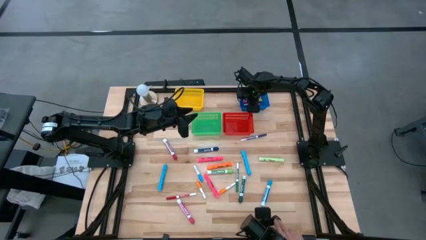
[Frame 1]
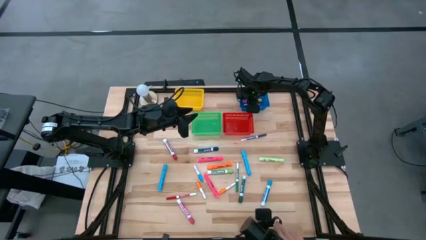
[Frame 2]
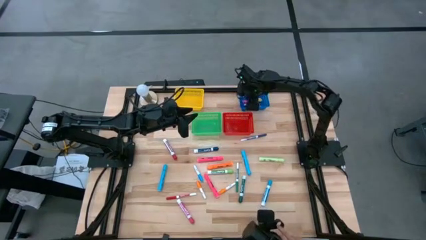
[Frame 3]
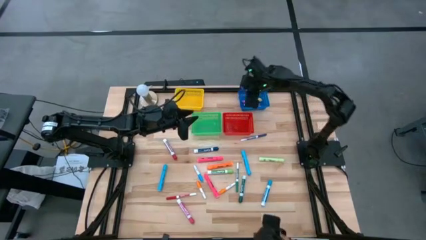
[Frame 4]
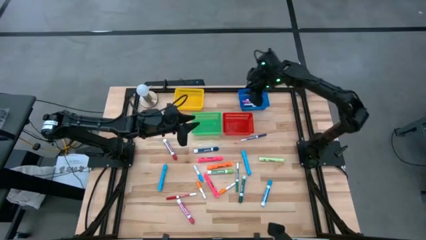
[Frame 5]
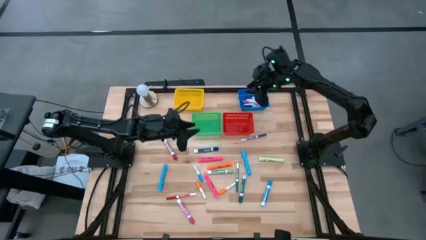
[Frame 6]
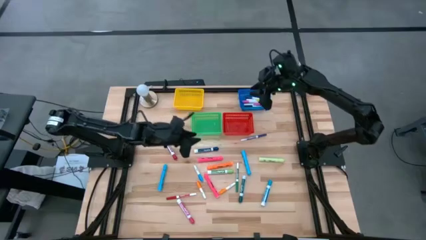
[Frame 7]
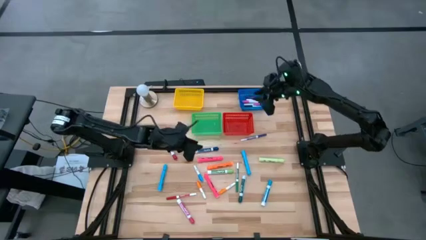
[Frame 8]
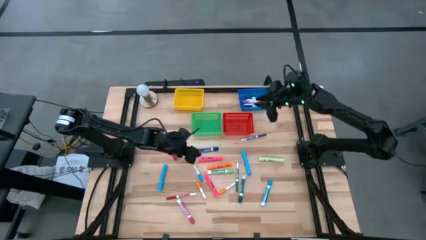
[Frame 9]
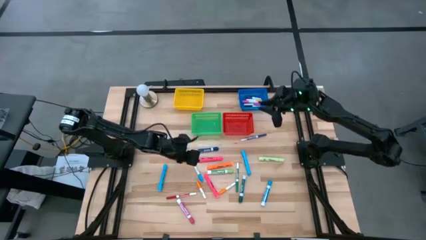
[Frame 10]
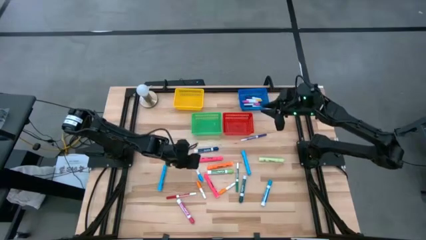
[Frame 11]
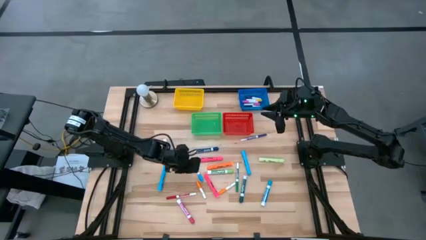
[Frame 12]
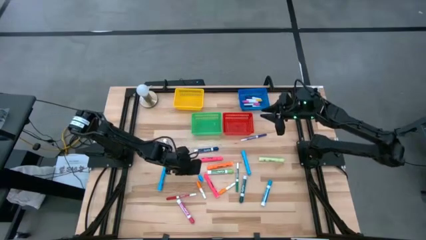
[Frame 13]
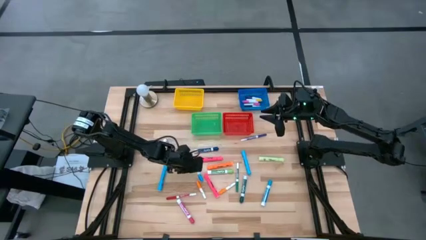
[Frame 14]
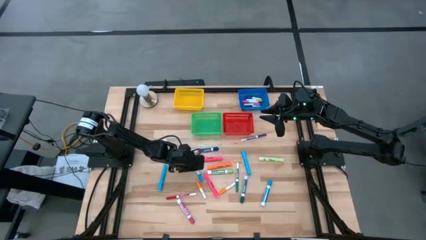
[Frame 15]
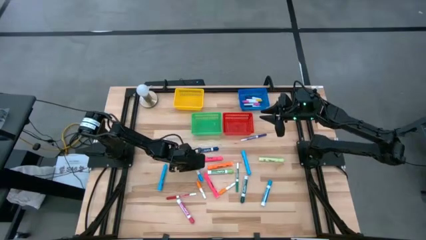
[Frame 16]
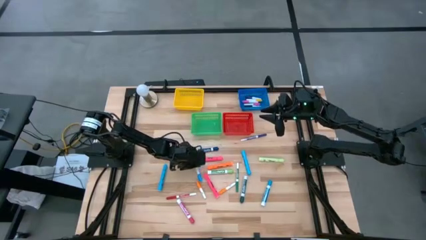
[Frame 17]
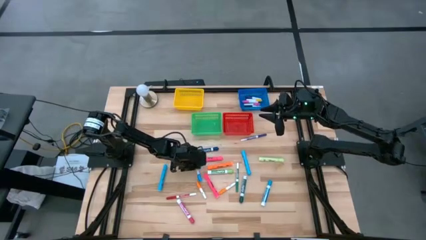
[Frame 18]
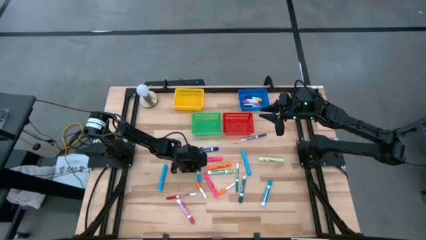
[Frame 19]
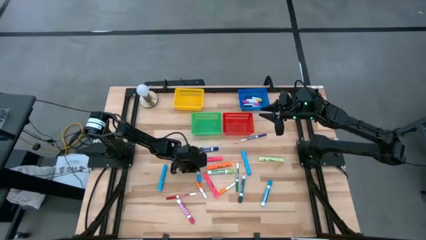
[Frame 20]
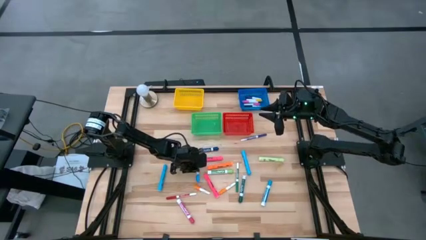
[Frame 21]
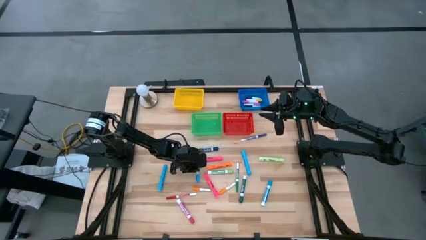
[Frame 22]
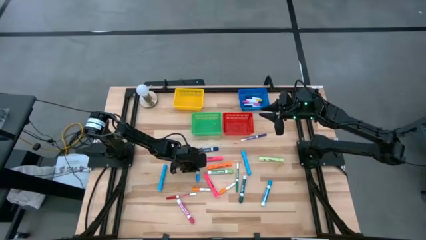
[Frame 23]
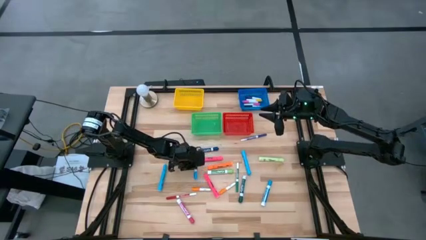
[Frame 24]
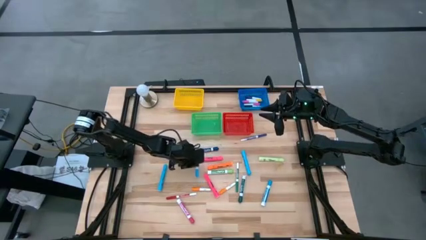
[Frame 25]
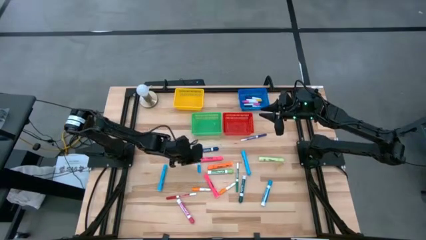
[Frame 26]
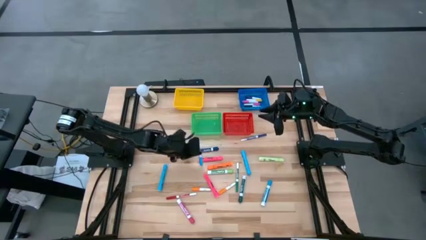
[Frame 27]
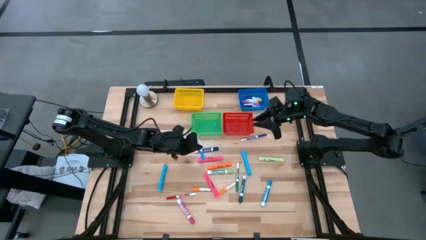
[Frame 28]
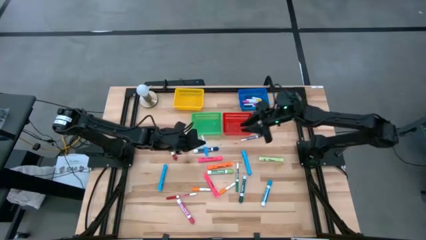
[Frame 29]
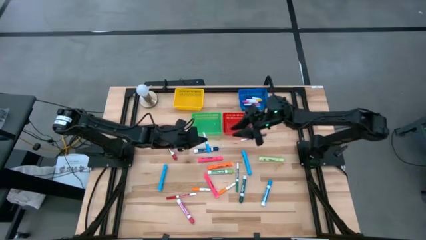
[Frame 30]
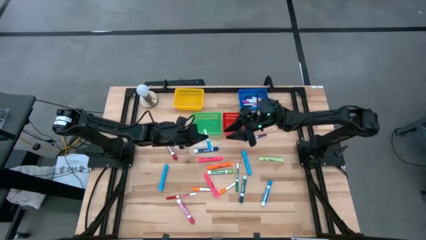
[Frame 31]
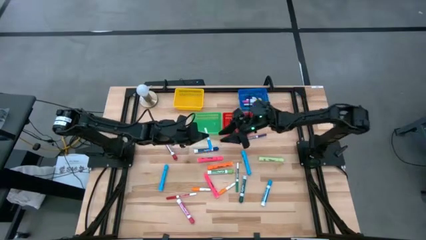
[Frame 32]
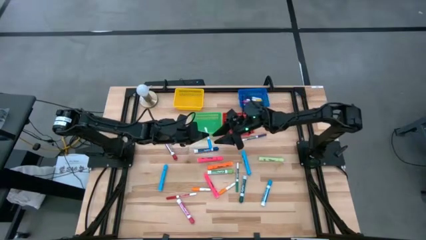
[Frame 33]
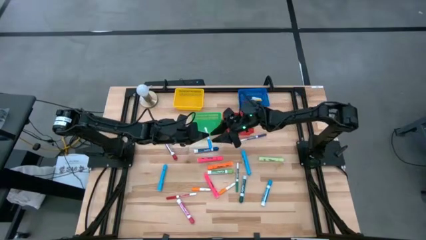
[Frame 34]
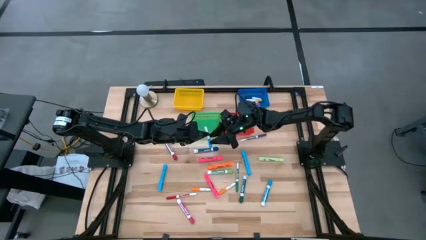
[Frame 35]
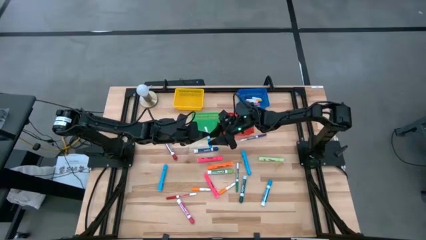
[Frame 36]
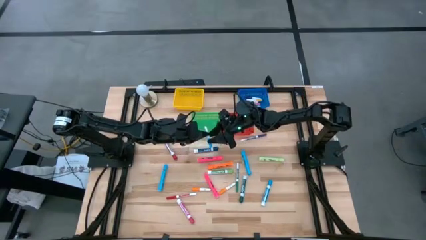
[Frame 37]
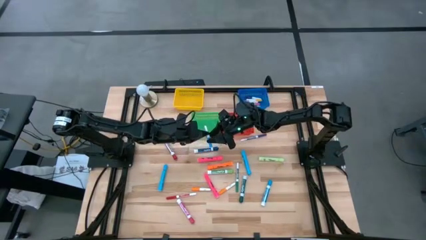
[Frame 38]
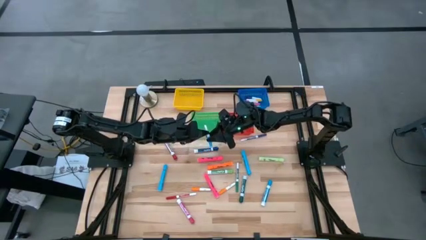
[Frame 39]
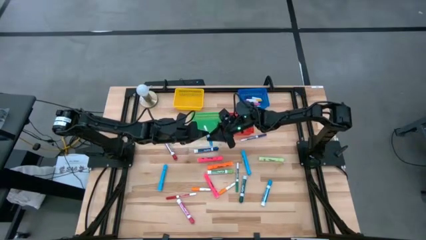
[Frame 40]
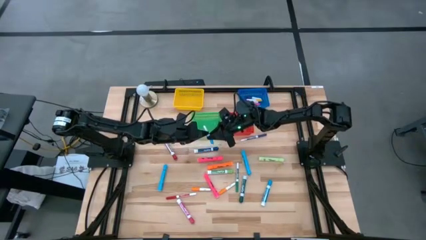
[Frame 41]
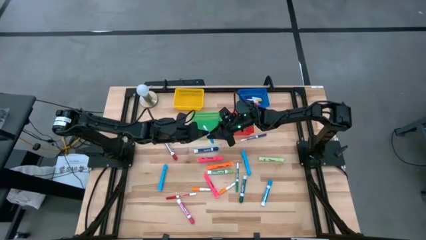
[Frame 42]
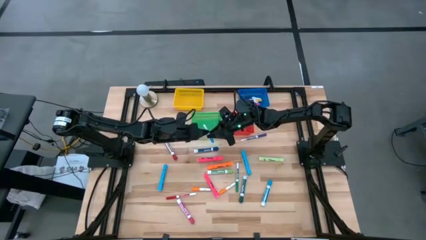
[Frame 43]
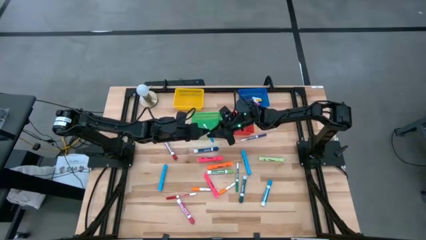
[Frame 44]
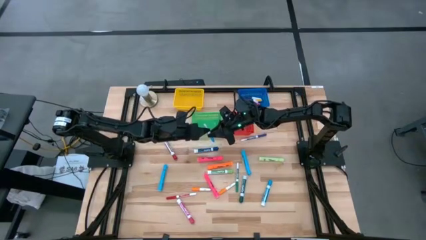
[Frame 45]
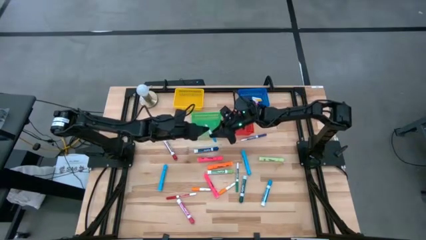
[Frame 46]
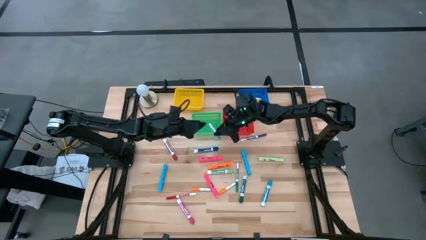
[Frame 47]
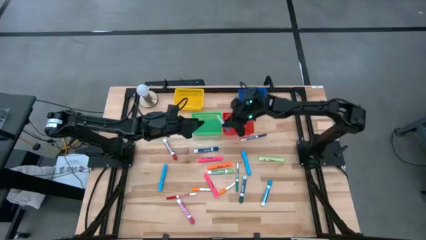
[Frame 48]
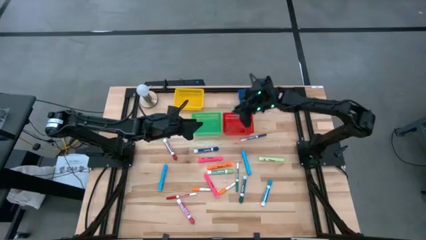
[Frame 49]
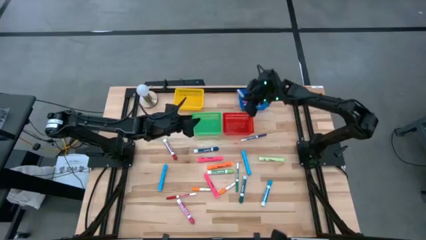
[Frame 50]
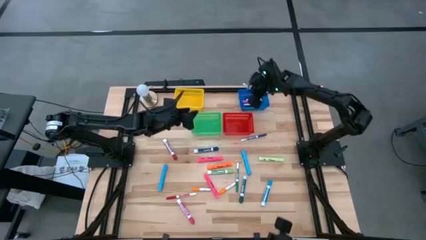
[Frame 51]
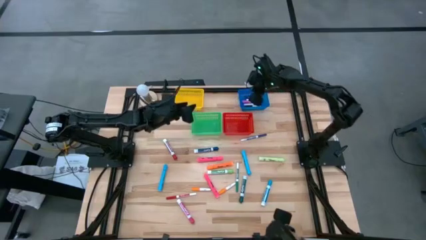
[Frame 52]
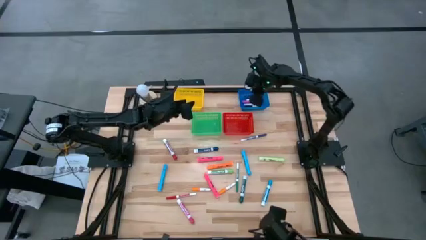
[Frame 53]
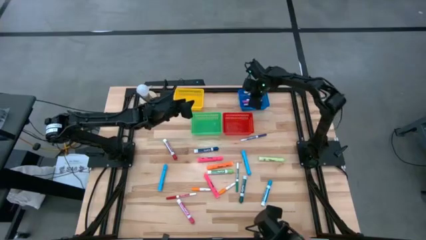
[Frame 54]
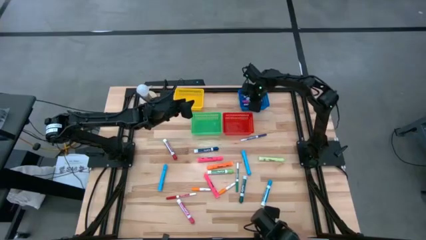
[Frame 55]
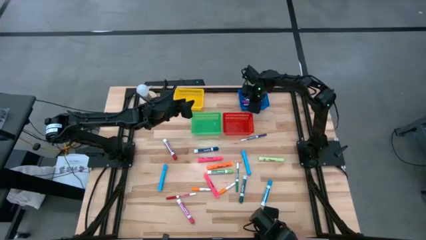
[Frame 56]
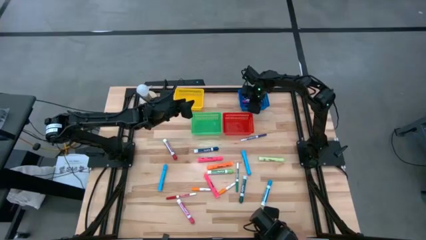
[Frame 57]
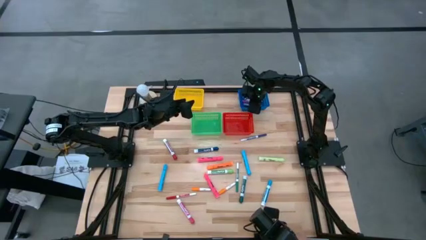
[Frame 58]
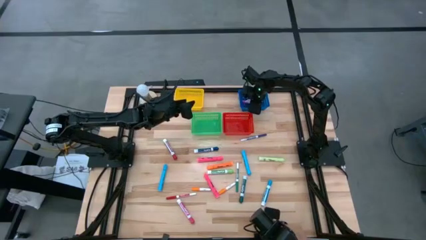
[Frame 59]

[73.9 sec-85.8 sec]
Task: Pick & Place Markers
Put the blue highlighter into the blue bin

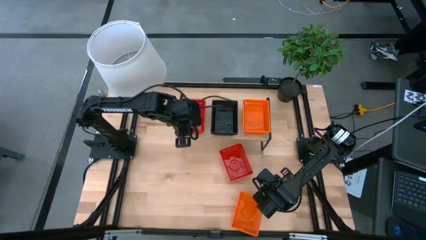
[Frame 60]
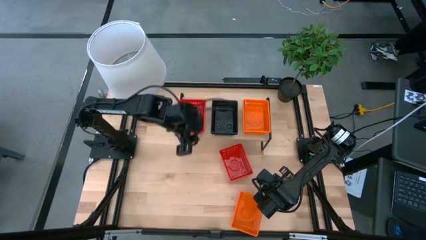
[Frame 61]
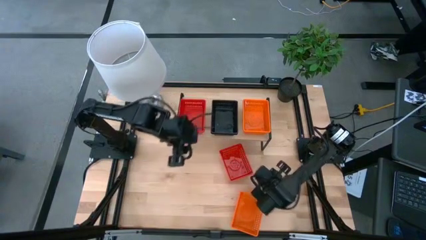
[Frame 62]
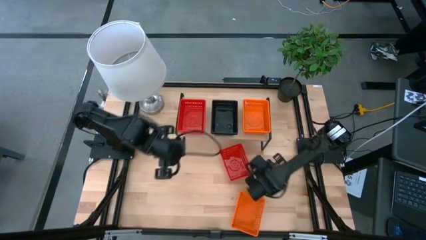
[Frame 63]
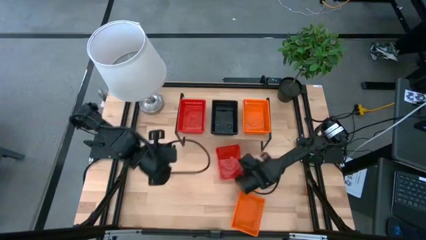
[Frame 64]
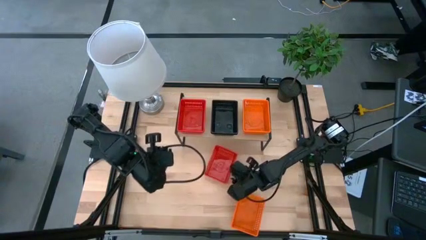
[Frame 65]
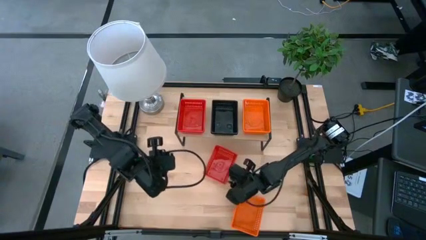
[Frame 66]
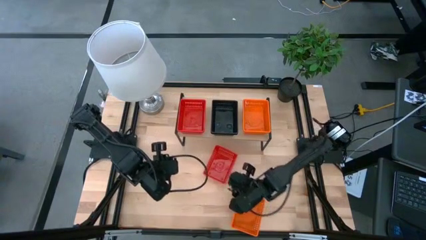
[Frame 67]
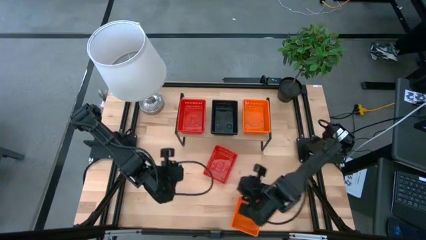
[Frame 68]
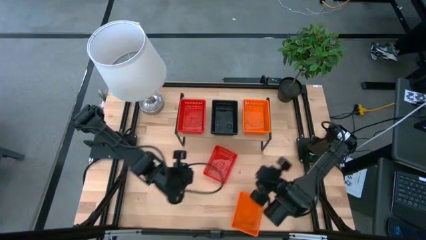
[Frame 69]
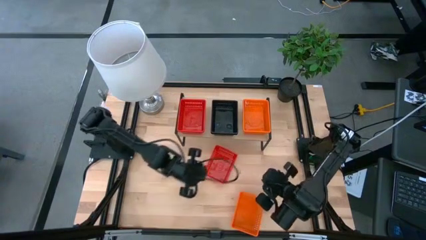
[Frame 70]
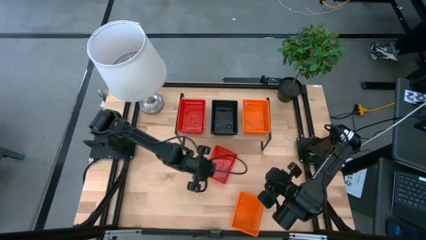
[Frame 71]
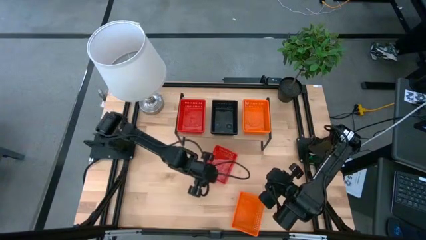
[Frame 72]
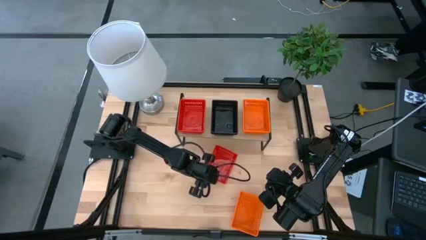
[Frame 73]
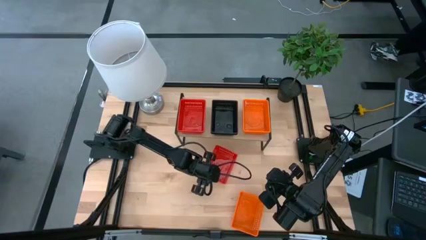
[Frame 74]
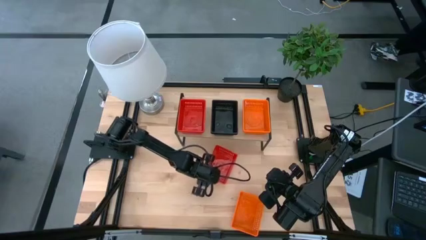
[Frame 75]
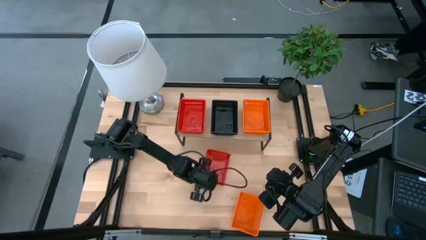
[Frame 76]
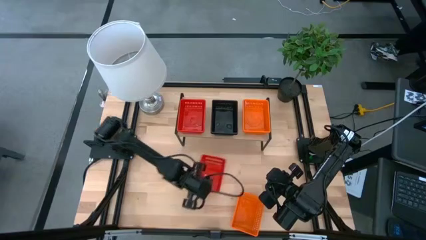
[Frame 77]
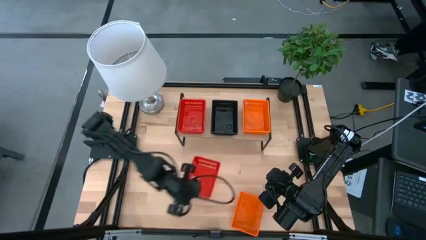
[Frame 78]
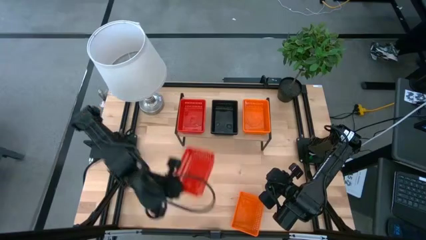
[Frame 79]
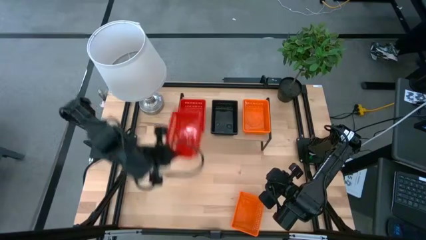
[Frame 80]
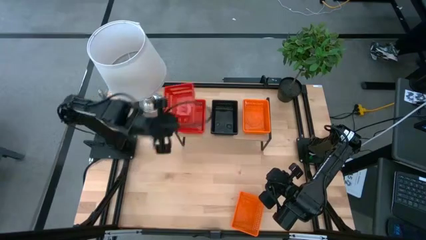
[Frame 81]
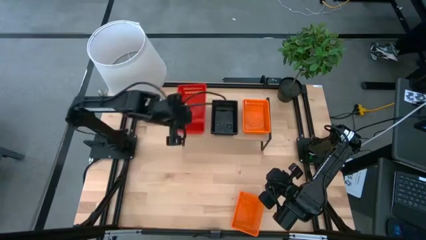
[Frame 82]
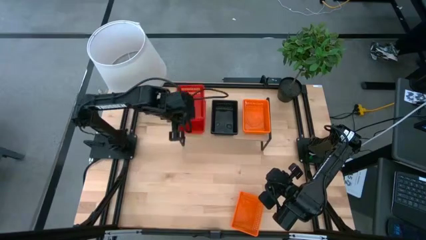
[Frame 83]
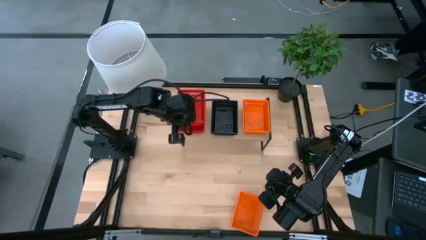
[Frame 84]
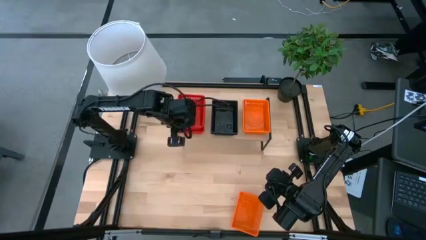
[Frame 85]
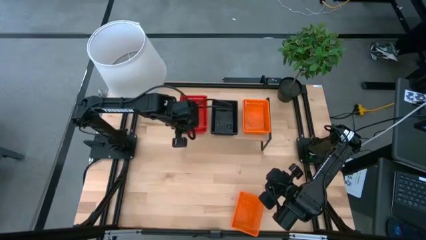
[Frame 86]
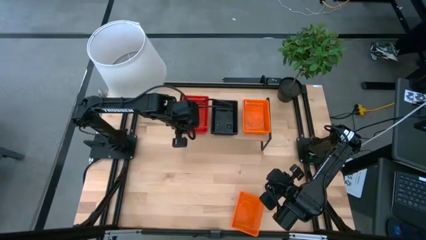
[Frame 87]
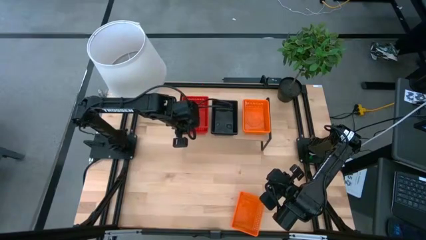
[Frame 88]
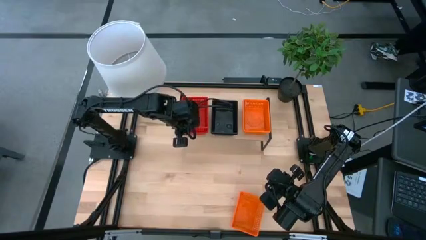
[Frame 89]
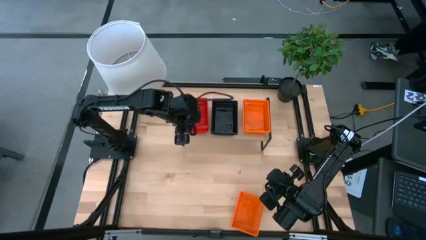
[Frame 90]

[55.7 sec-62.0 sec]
Task: Stack baskets on shelf by color
Stack the red bin on top of the red bin
